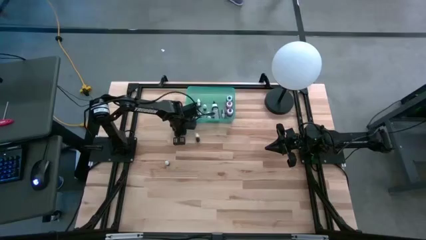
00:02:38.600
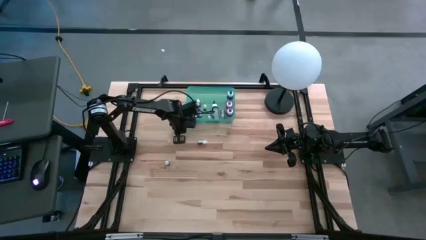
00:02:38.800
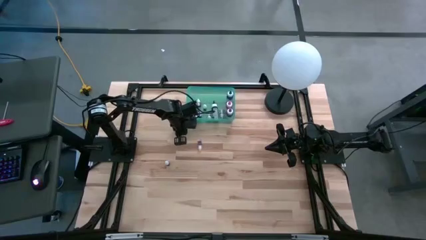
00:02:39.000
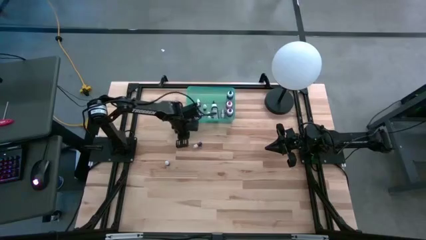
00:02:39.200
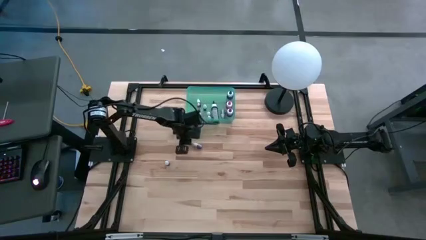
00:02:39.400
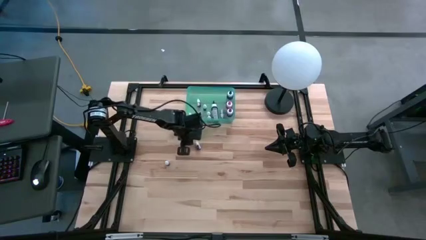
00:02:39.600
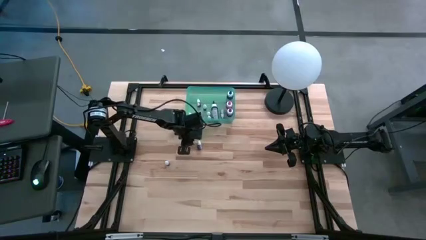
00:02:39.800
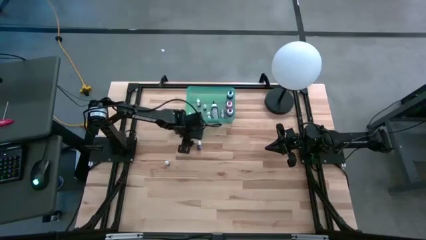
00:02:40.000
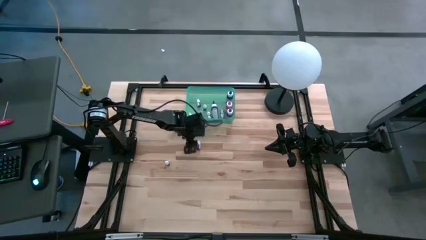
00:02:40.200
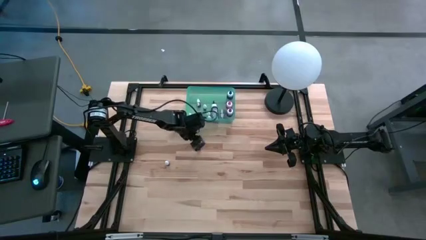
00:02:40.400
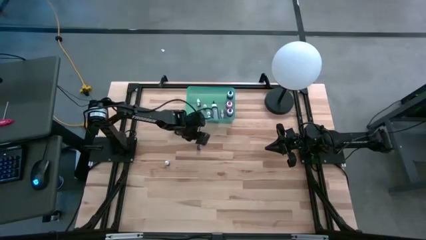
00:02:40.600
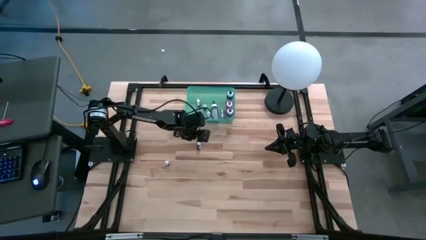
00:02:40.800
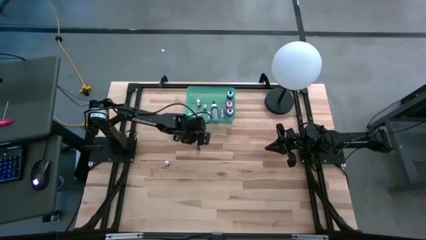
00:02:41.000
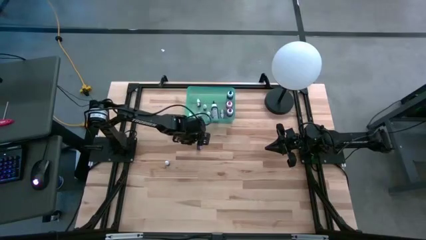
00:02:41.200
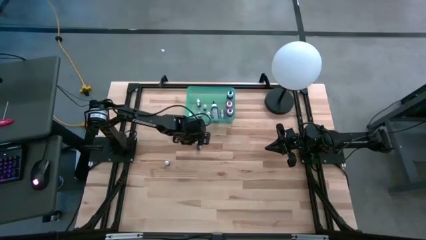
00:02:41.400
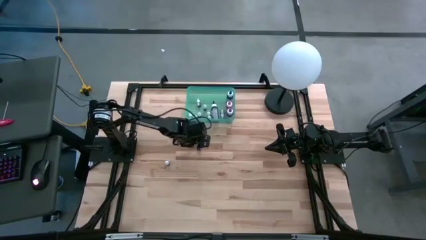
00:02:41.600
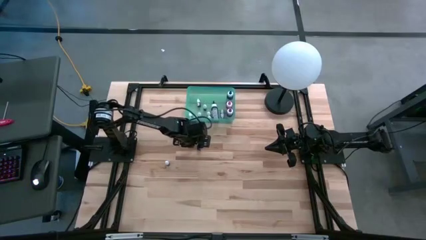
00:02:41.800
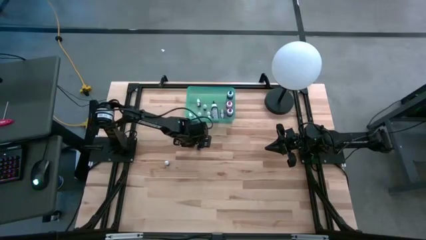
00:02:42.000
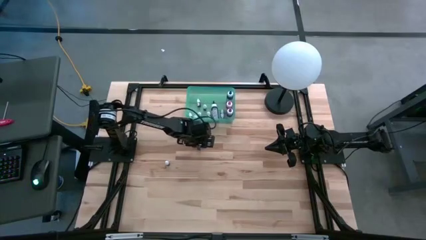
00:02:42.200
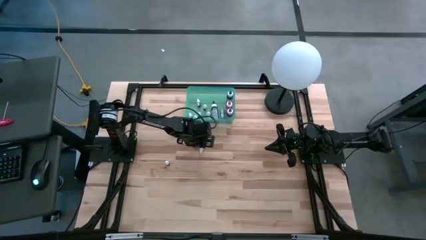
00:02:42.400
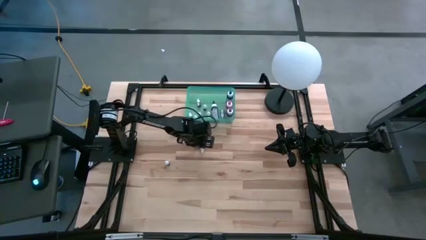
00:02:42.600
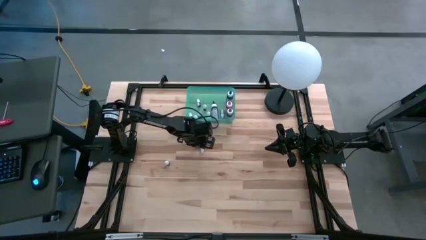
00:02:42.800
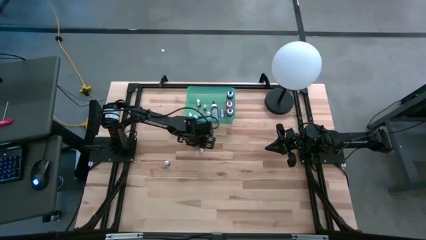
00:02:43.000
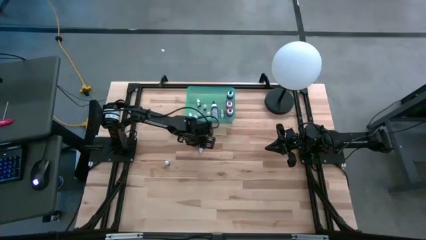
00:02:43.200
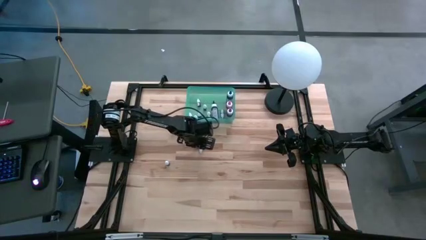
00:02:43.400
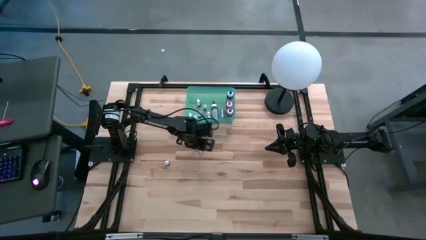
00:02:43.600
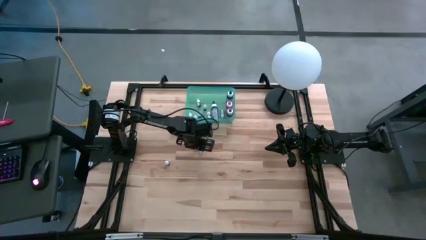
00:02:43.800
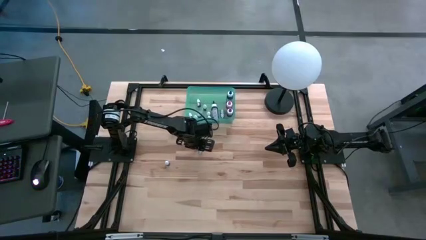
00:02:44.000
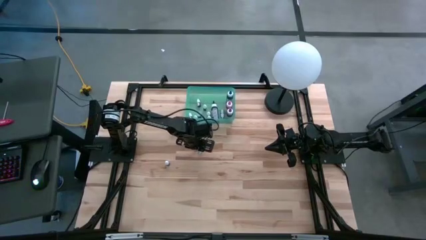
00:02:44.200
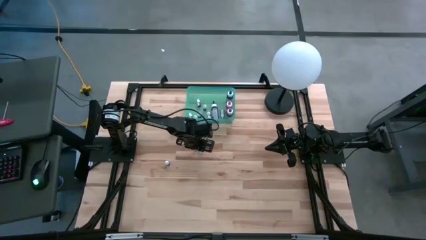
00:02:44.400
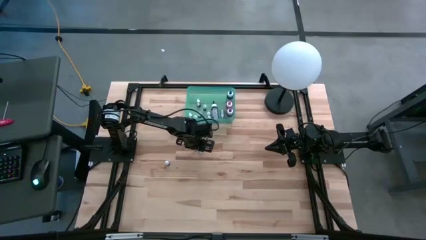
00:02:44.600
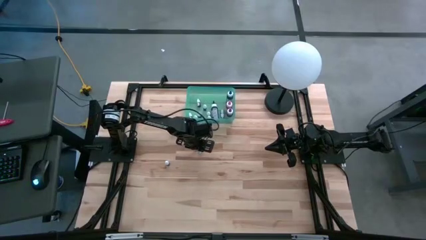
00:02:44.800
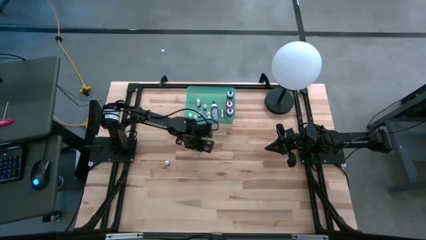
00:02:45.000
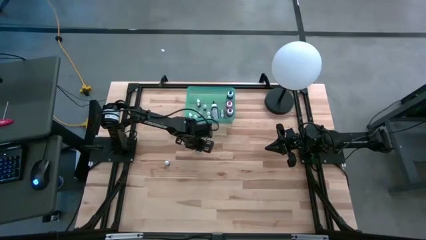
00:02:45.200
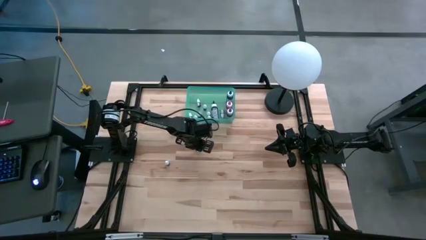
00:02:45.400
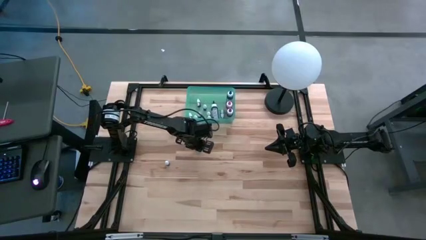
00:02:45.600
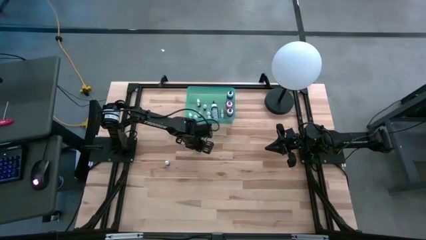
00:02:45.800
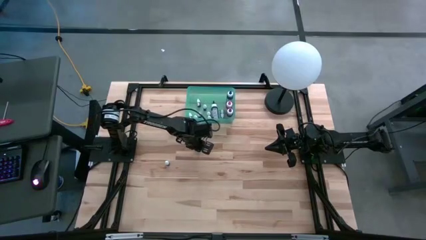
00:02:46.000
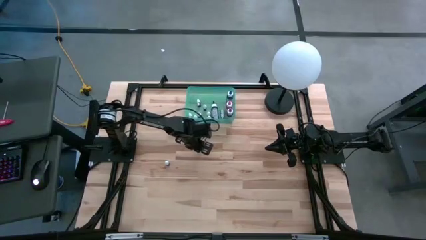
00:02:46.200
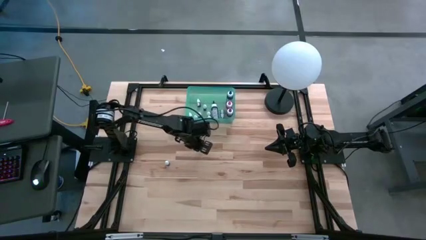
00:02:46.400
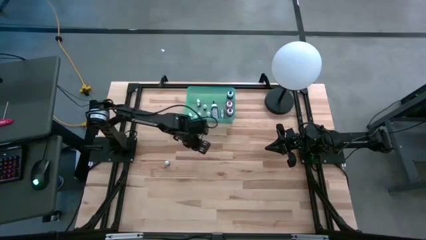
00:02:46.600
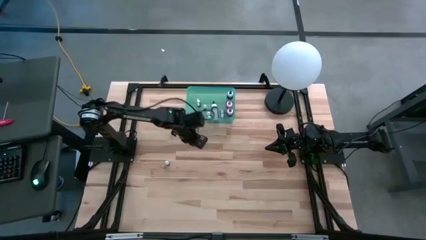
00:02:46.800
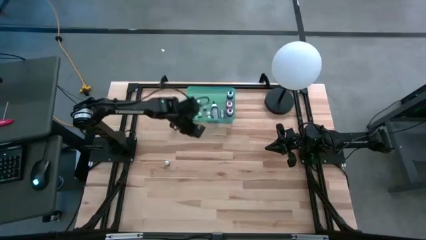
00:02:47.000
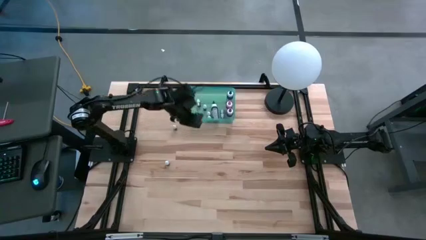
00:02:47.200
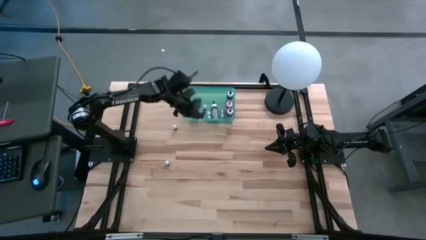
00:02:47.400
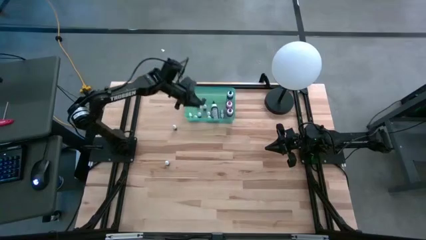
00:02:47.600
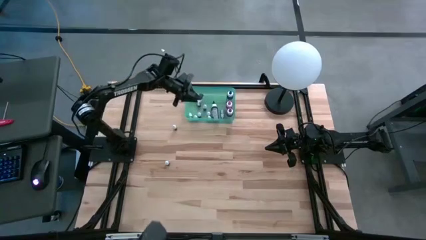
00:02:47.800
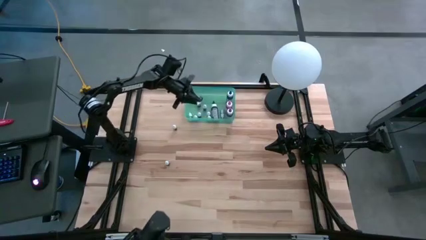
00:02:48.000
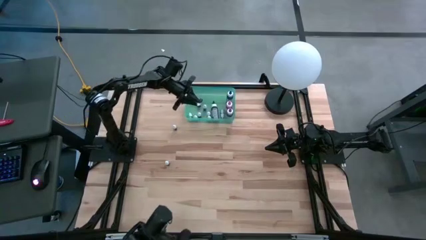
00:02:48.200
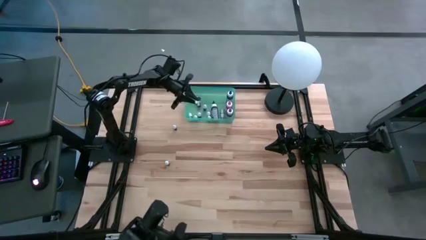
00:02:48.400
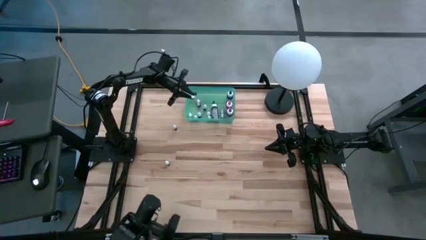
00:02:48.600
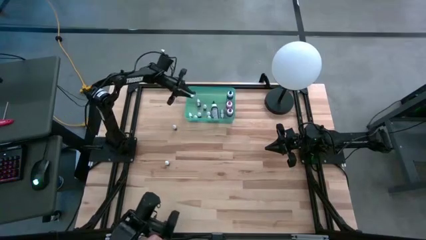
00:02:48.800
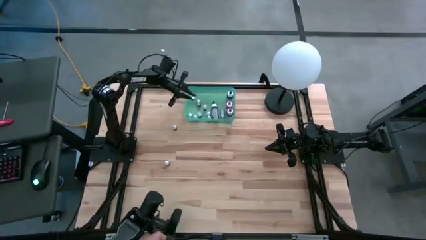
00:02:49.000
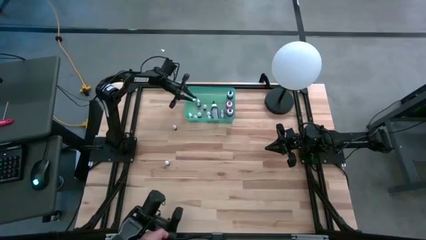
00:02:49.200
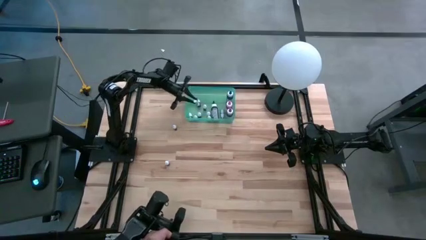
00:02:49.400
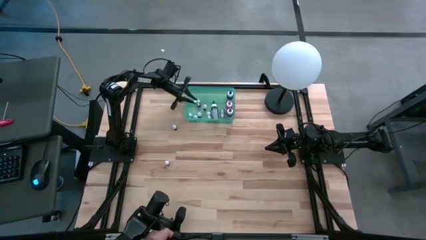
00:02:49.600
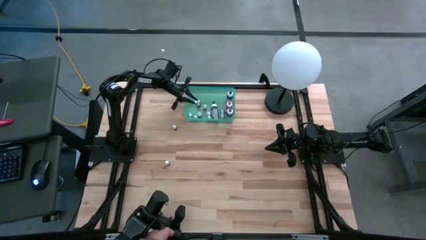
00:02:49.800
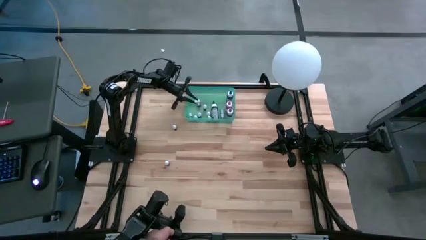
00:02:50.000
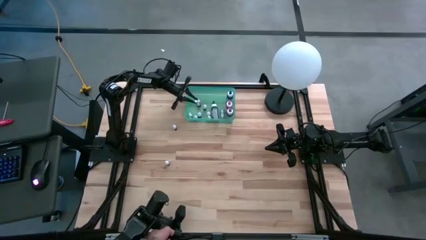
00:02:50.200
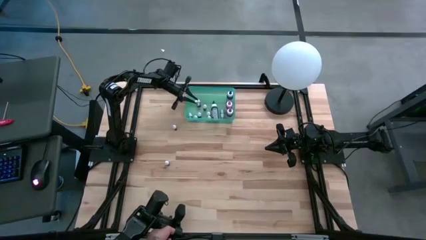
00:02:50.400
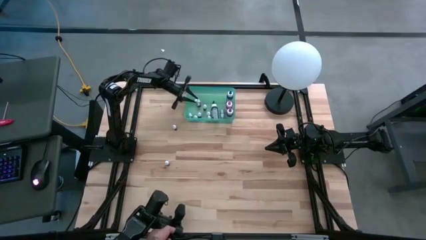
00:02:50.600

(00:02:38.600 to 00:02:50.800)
Task: Pick & Place food coloring
Put the small purple food coloring into the bin
